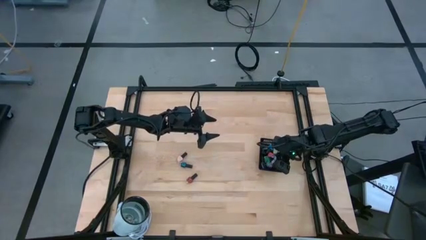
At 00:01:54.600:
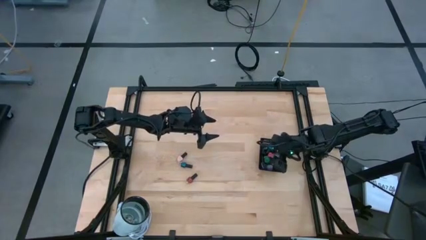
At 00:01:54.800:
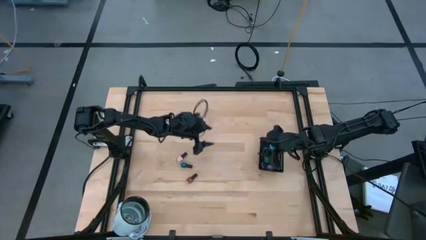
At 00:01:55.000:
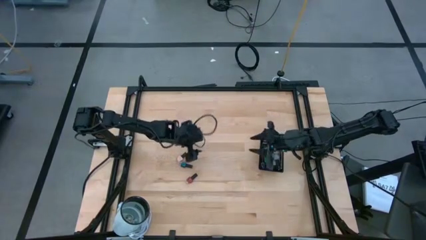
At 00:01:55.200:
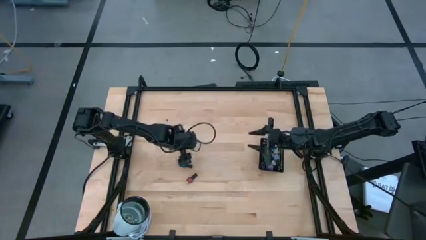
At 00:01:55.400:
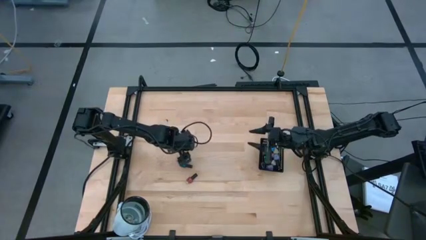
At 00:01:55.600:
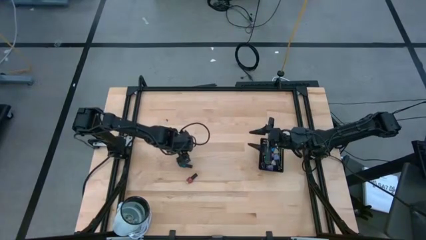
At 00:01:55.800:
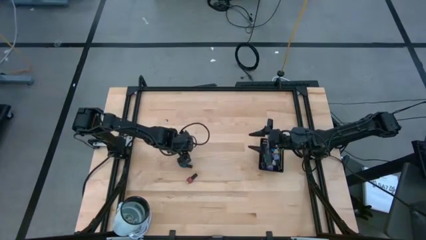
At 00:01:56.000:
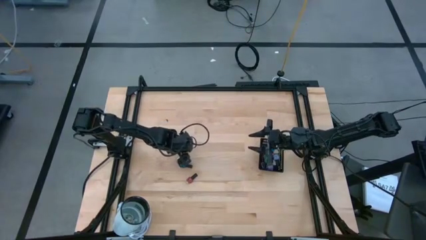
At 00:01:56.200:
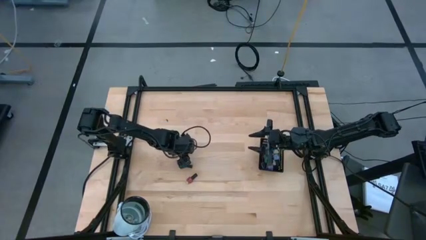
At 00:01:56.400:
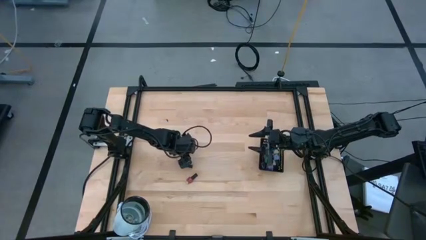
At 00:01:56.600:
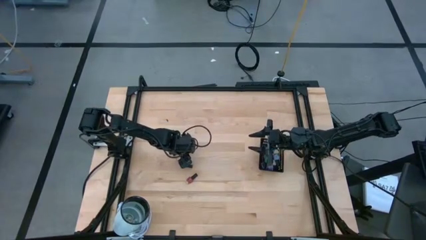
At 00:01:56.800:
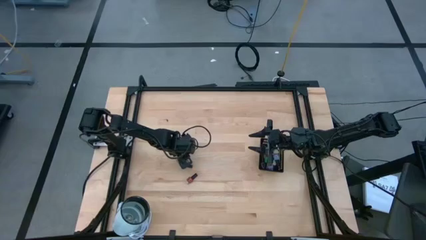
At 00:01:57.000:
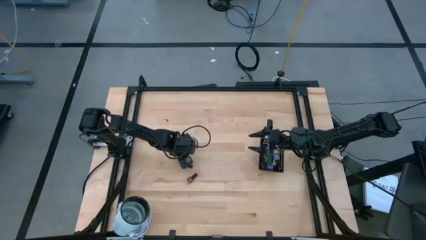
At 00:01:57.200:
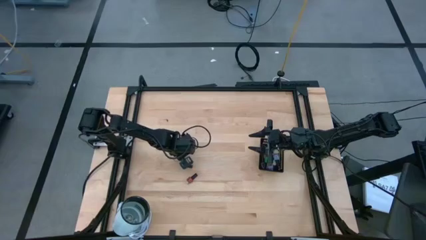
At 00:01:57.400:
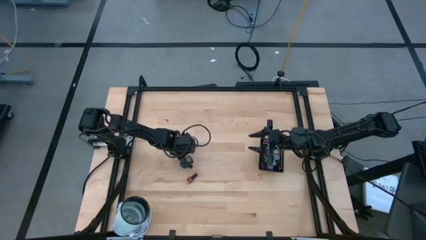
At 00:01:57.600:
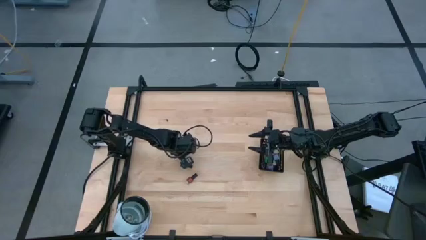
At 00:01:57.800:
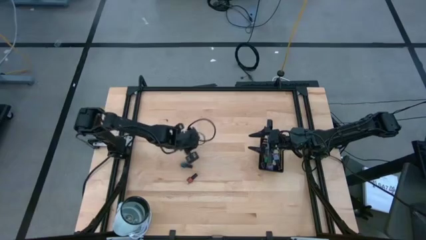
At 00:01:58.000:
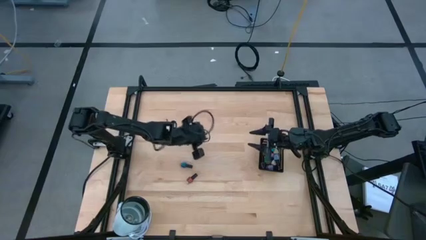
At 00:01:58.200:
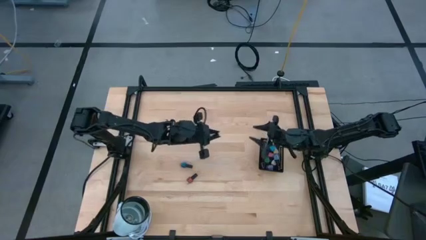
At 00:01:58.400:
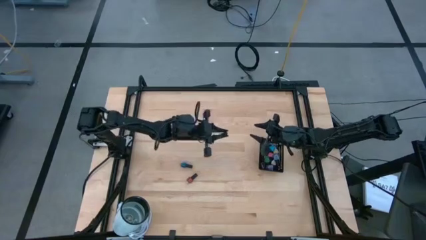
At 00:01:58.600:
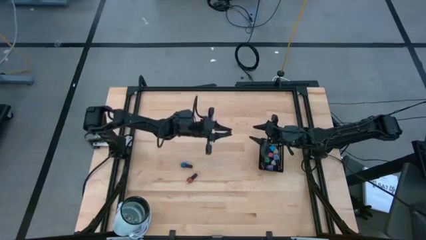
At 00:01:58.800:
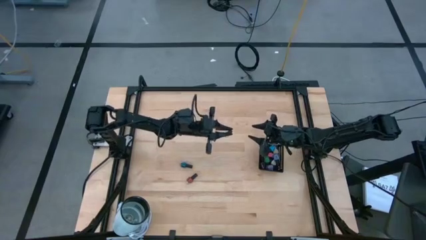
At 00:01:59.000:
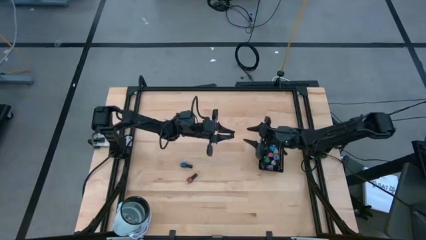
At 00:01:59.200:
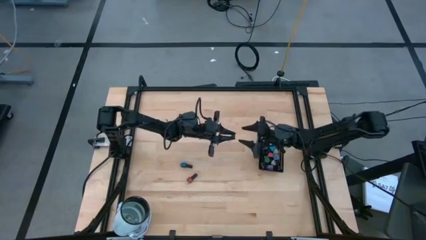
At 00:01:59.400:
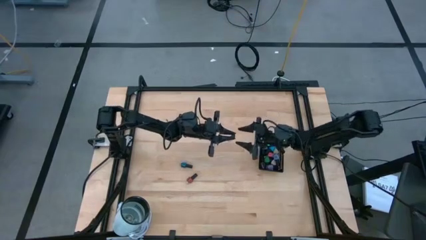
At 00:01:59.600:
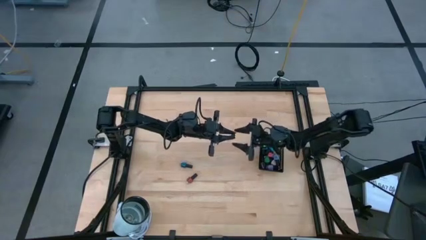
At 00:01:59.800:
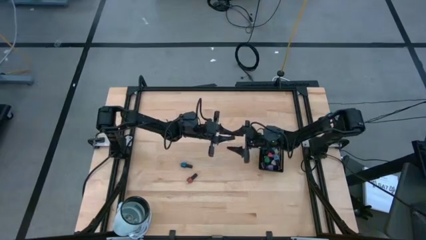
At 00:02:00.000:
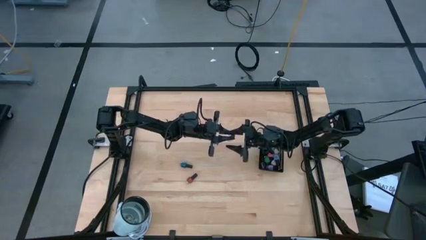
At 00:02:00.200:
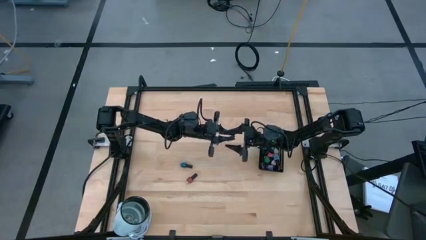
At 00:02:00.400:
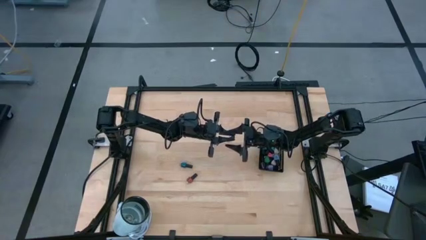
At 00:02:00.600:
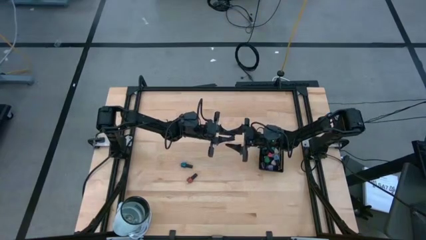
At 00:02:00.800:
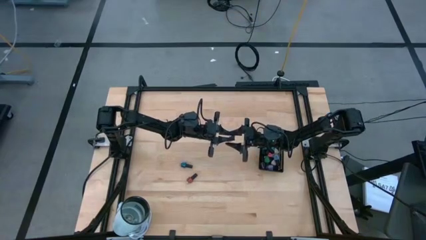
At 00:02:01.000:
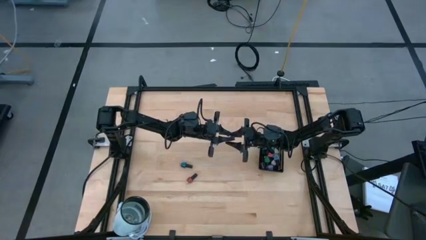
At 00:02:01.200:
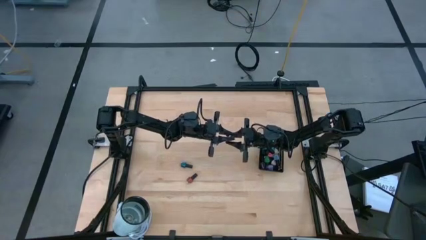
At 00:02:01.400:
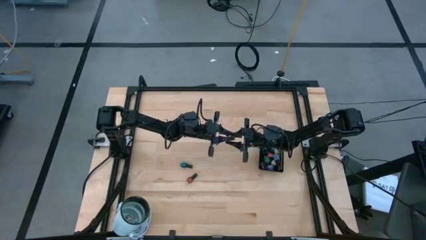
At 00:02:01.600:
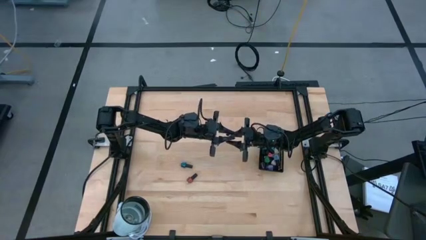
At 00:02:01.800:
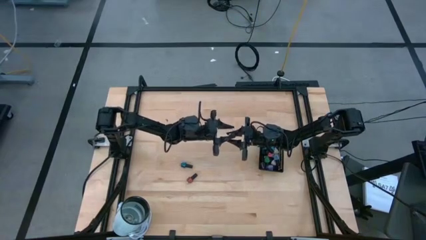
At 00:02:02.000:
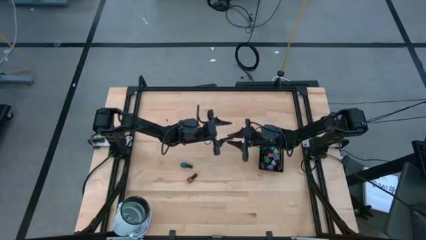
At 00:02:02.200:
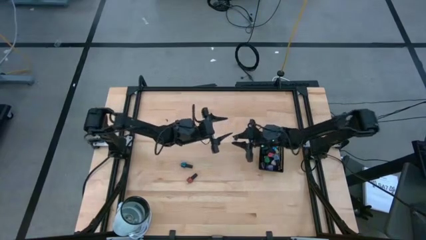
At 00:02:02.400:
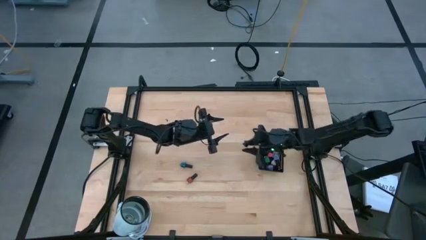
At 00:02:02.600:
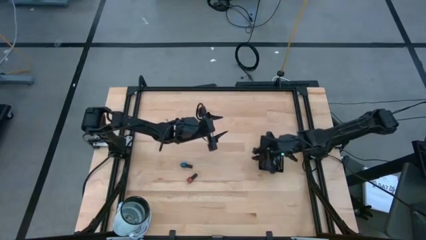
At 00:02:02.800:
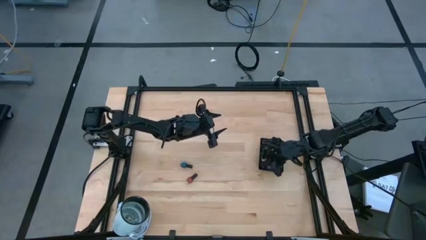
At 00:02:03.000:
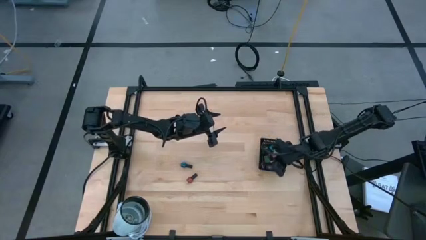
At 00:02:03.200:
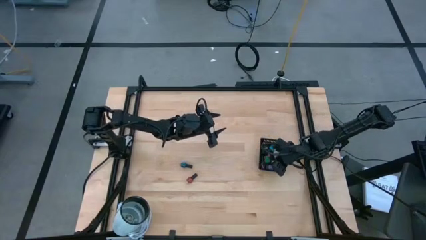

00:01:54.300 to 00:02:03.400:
Task: Pick & Place Nail Polish
Put the light pink nail polish into the black basket

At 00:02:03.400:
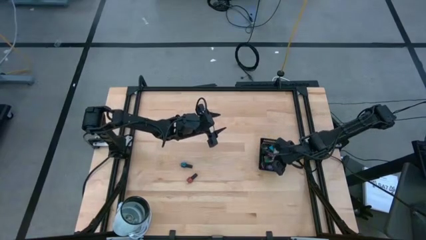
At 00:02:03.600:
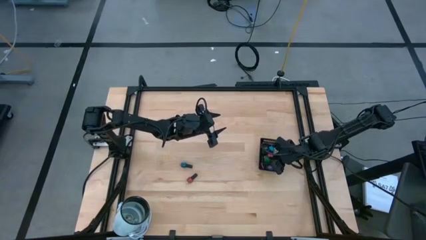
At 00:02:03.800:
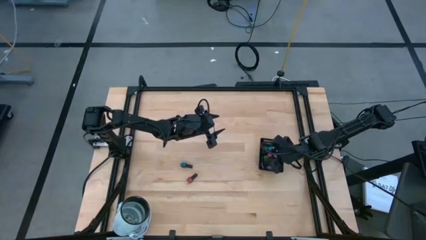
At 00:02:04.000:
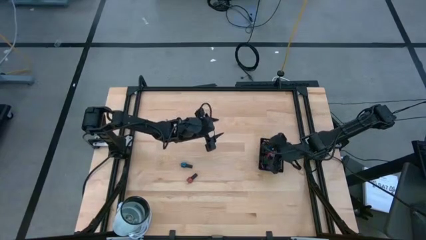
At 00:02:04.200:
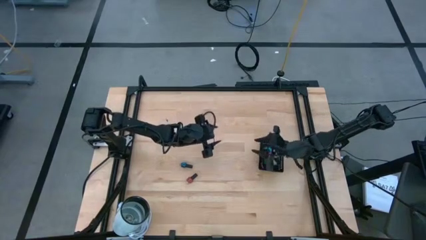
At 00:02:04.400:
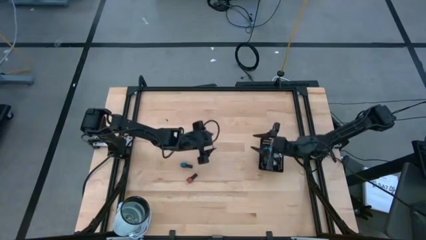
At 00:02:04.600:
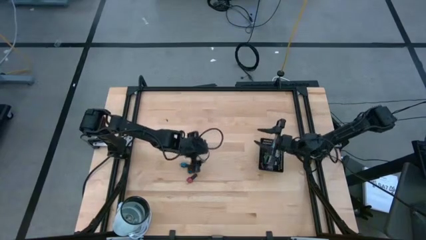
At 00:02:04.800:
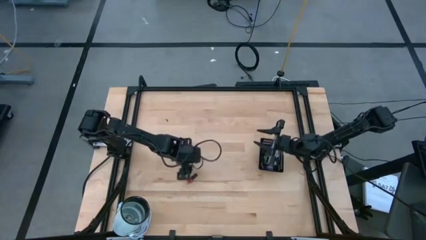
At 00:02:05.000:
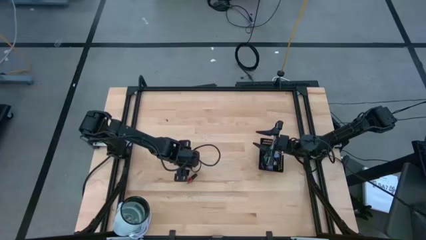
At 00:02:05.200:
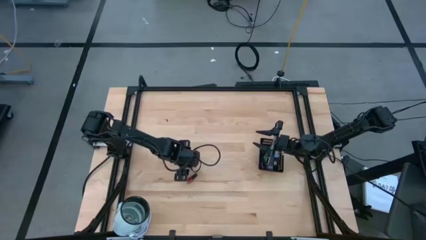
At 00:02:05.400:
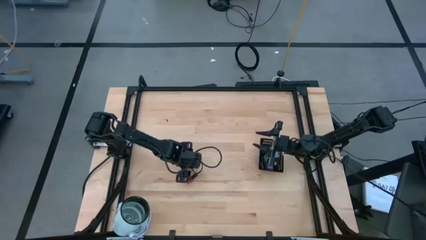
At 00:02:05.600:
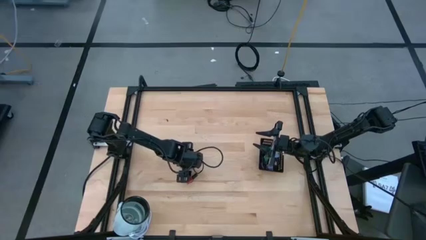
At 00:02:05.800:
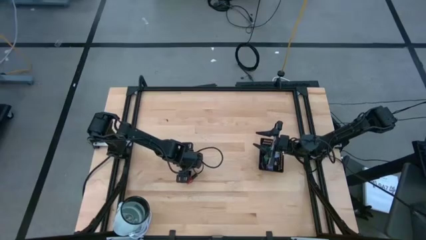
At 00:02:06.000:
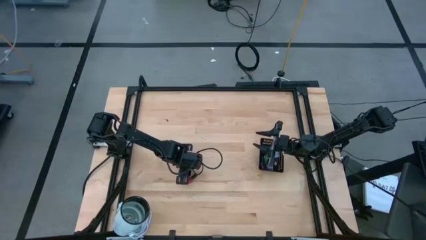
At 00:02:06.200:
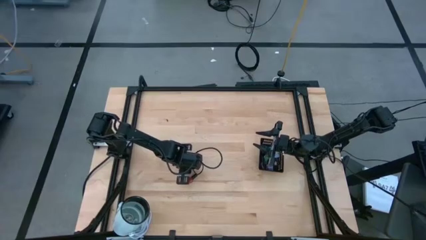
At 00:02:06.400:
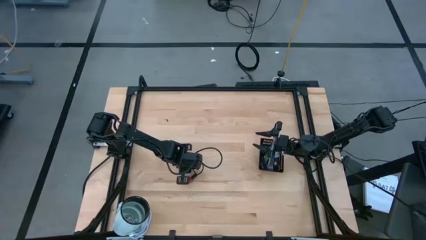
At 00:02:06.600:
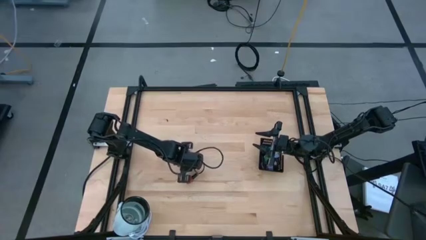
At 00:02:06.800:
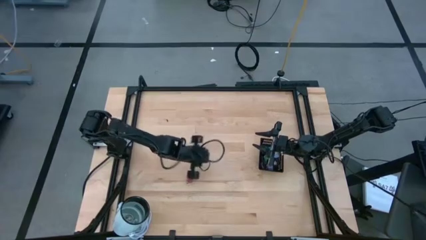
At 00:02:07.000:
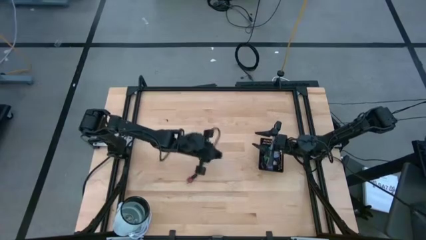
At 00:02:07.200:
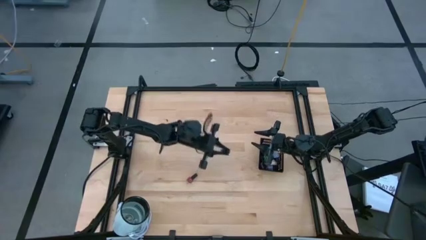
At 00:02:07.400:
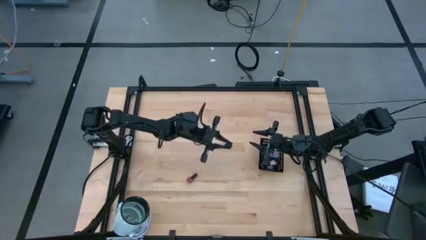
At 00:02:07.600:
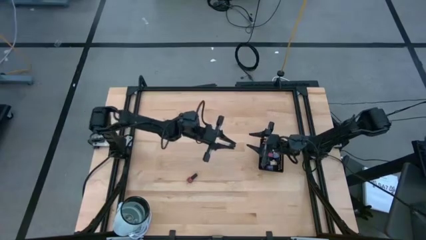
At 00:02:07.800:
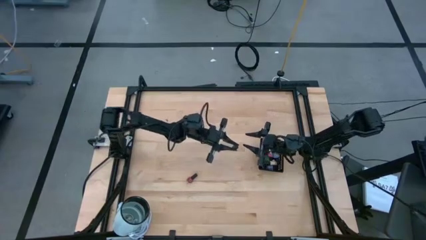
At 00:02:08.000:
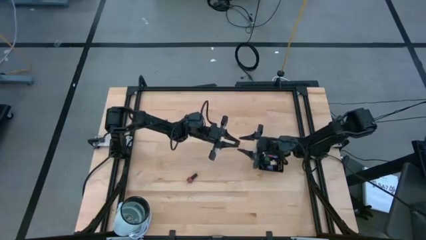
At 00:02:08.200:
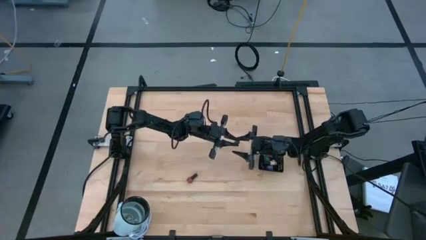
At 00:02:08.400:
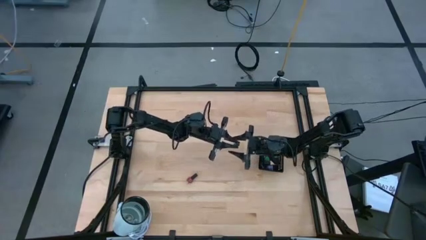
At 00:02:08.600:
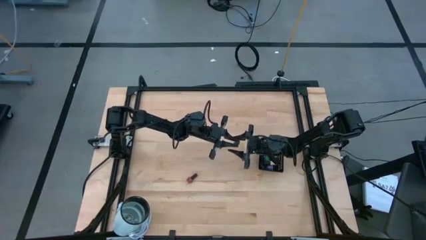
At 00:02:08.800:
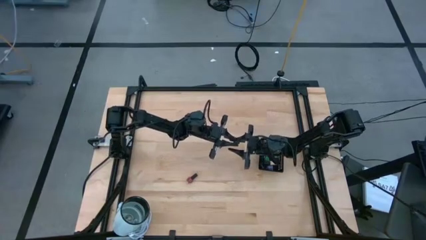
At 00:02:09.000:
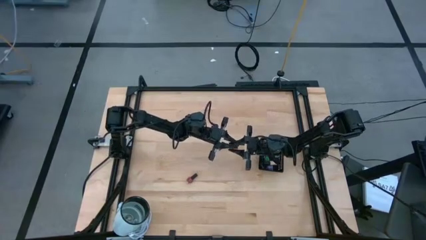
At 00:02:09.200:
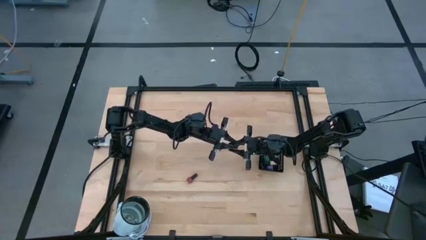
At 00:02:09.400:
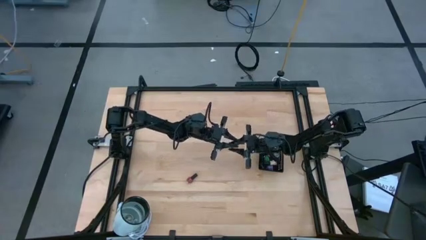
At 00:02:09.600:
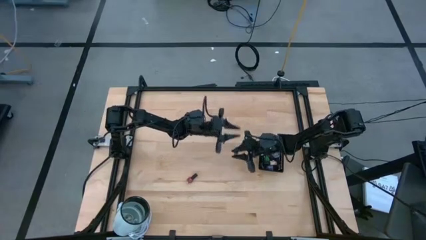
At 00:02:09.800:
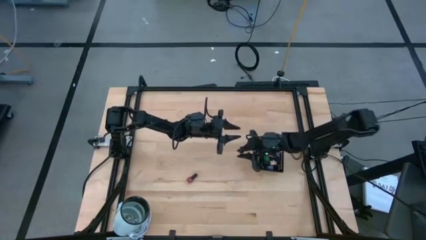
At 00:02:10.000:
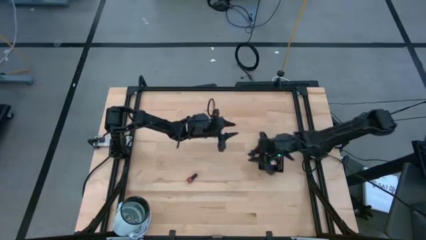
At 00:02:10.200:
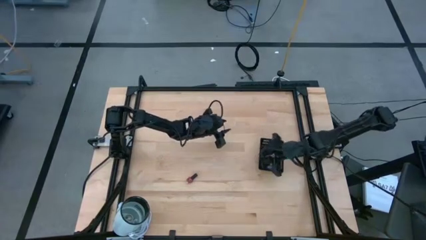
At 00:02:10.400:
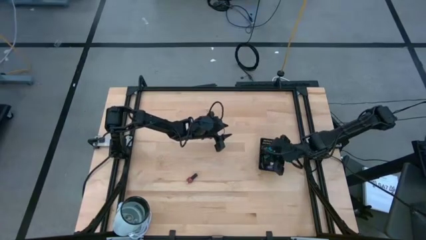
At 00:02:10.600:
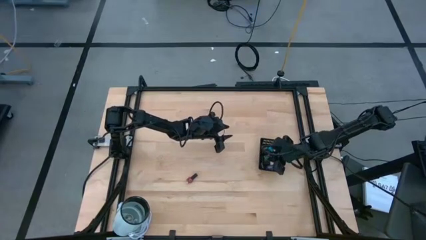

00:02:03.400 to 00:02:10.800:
Put the dark blue nail polish into the black basket
